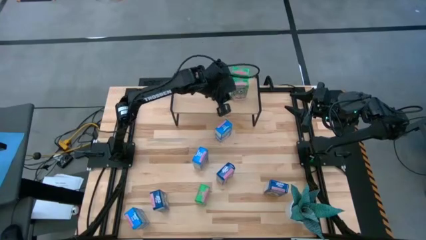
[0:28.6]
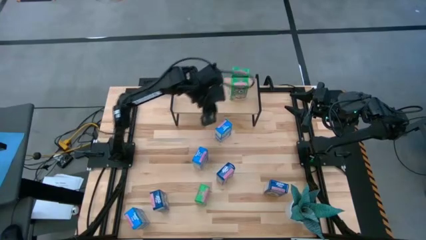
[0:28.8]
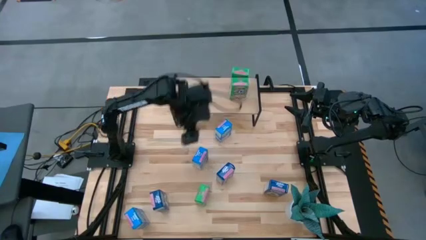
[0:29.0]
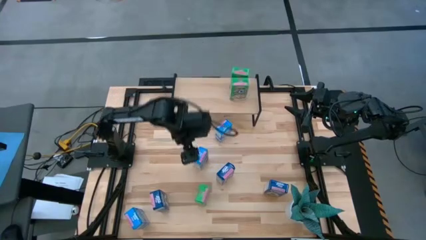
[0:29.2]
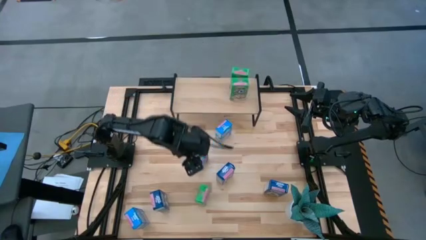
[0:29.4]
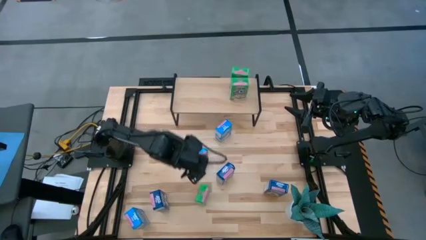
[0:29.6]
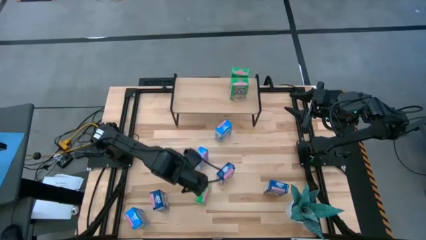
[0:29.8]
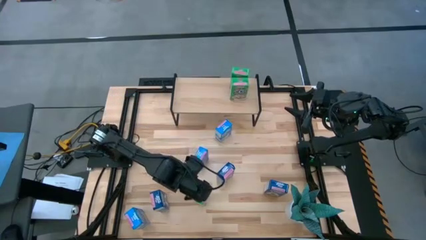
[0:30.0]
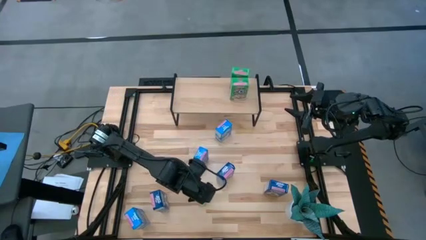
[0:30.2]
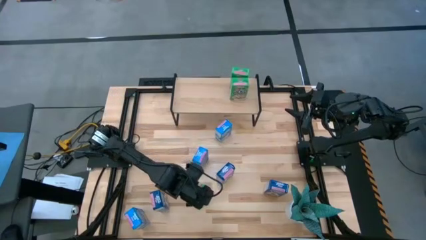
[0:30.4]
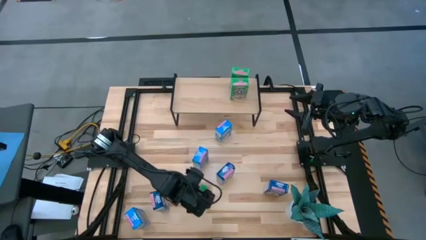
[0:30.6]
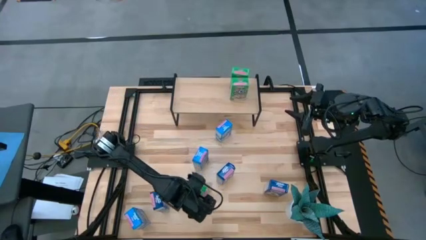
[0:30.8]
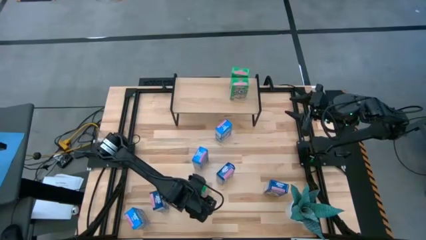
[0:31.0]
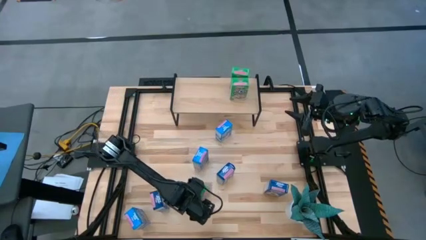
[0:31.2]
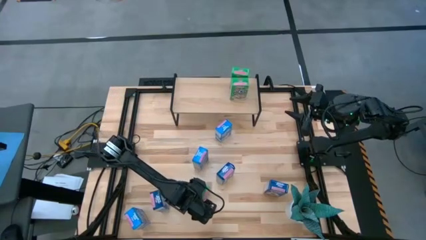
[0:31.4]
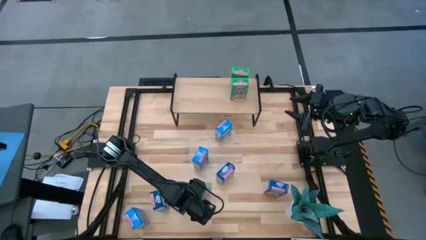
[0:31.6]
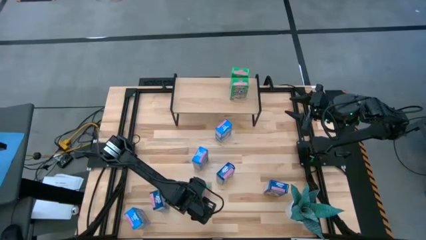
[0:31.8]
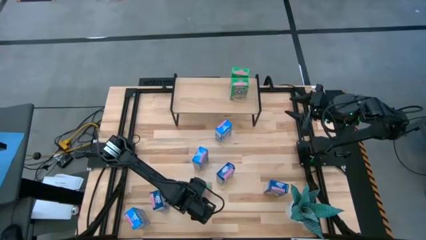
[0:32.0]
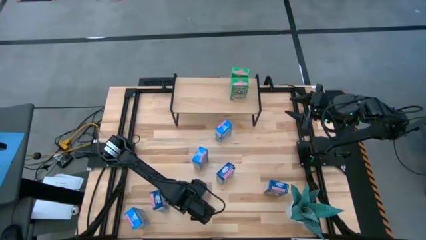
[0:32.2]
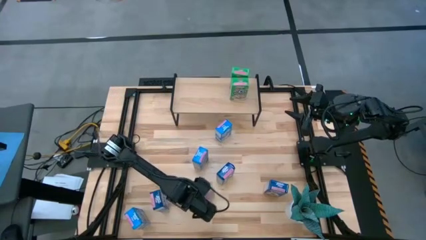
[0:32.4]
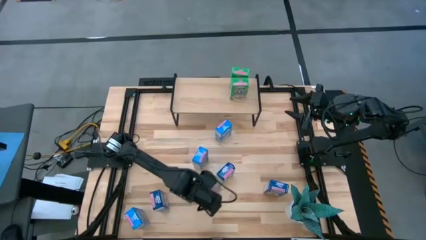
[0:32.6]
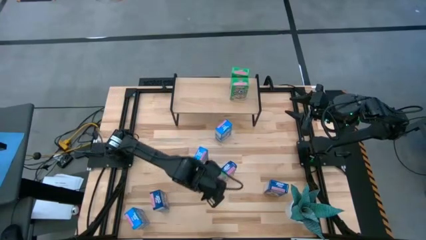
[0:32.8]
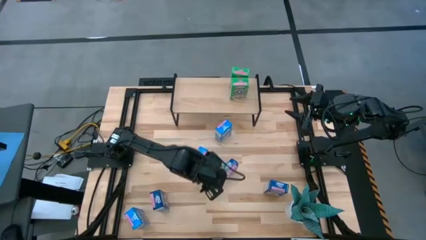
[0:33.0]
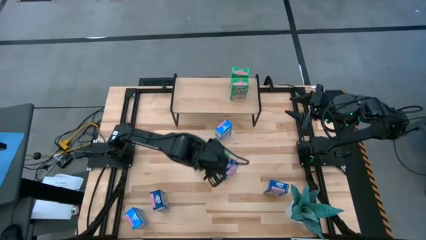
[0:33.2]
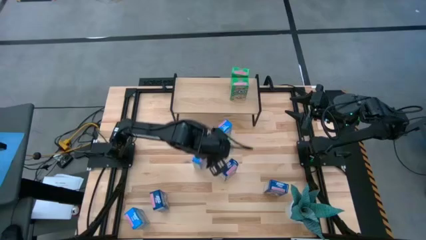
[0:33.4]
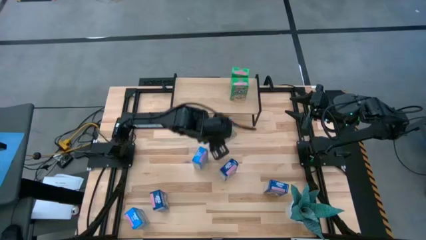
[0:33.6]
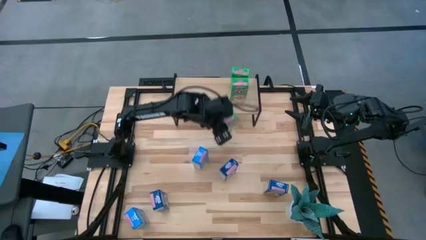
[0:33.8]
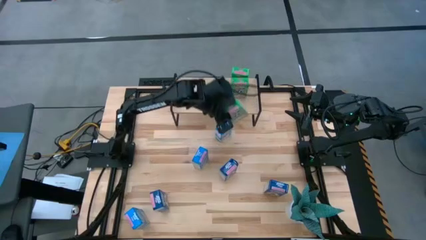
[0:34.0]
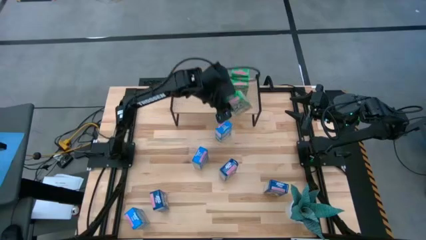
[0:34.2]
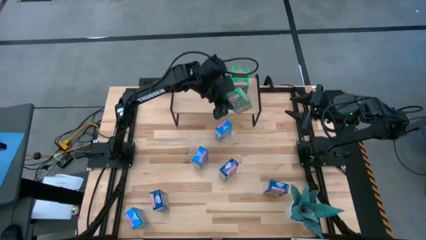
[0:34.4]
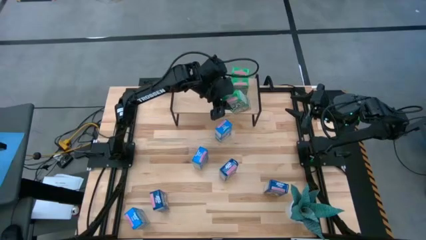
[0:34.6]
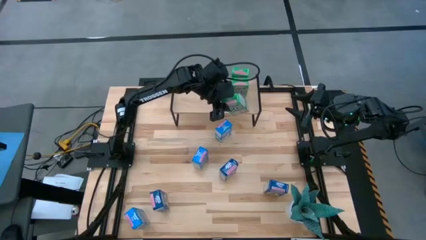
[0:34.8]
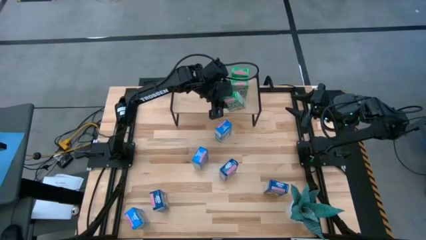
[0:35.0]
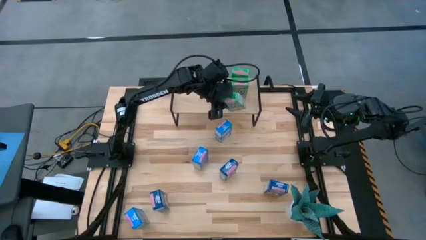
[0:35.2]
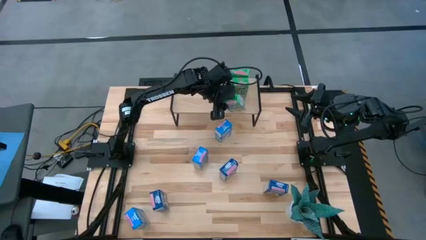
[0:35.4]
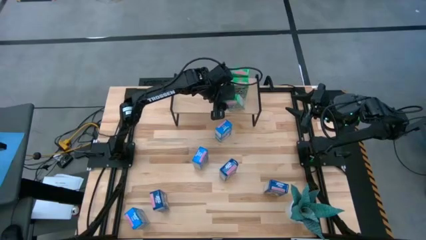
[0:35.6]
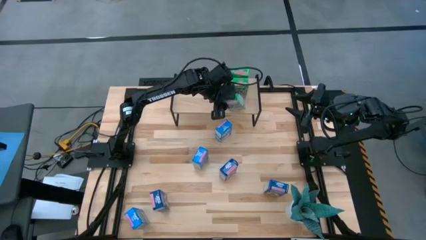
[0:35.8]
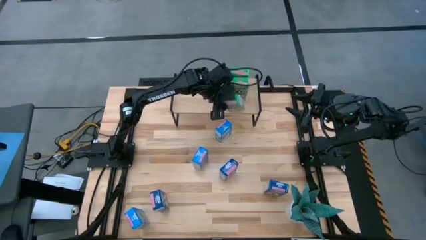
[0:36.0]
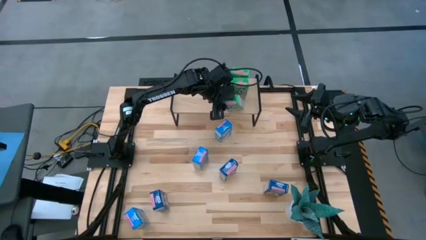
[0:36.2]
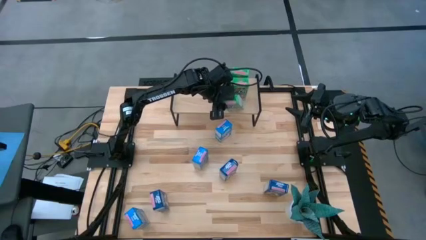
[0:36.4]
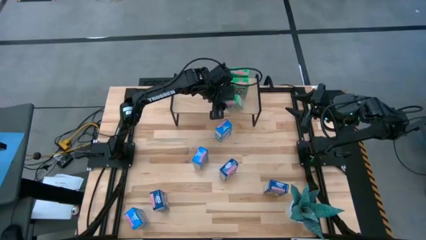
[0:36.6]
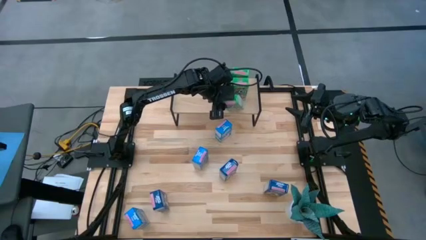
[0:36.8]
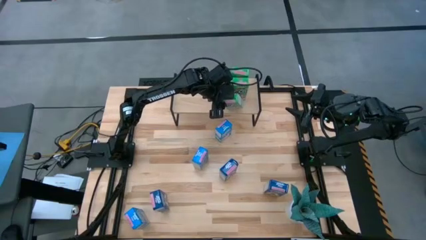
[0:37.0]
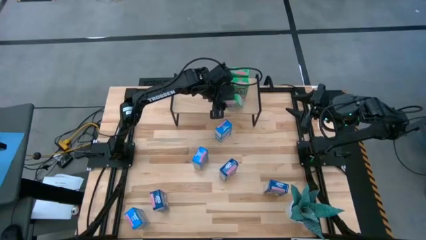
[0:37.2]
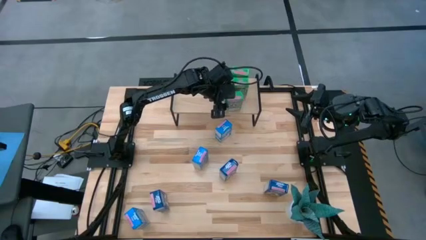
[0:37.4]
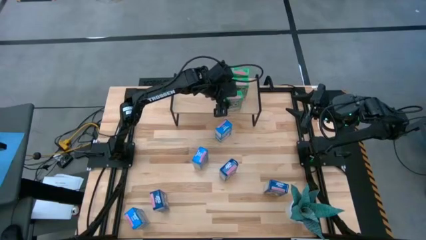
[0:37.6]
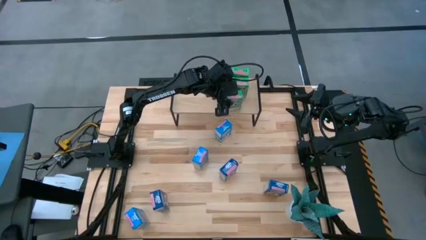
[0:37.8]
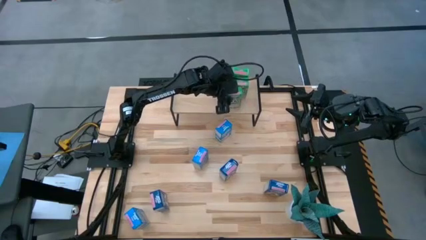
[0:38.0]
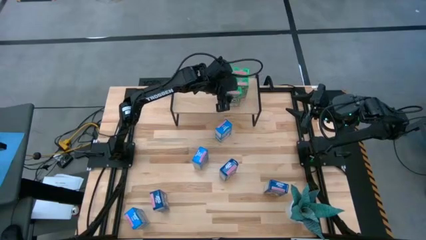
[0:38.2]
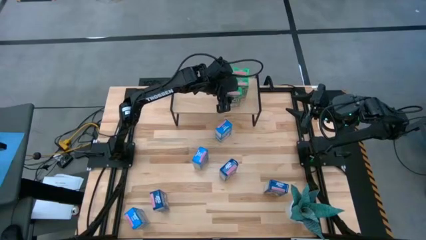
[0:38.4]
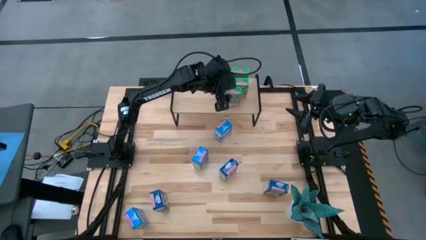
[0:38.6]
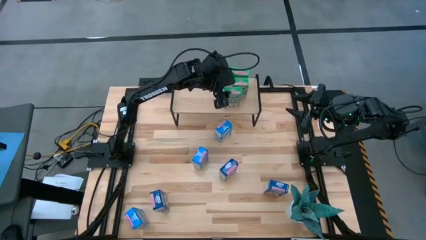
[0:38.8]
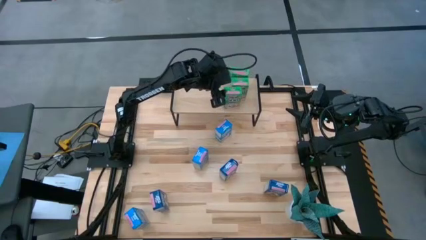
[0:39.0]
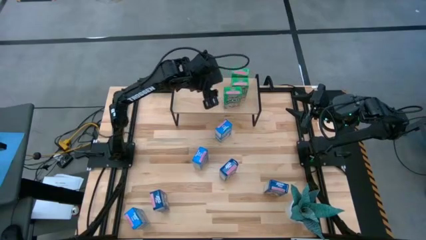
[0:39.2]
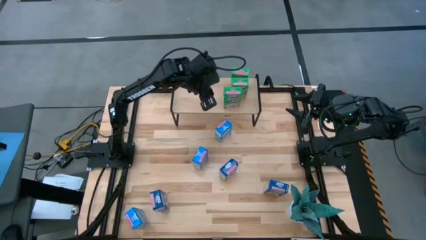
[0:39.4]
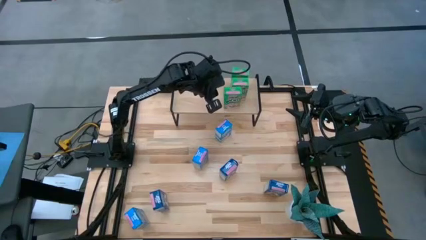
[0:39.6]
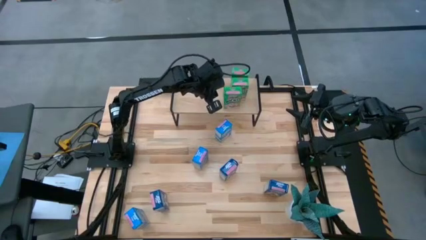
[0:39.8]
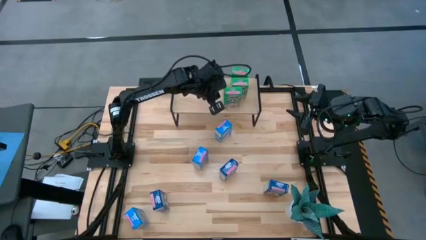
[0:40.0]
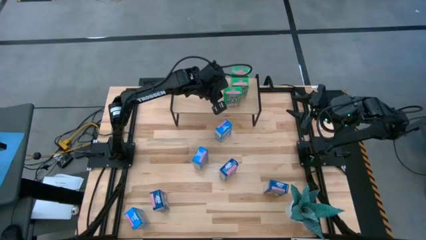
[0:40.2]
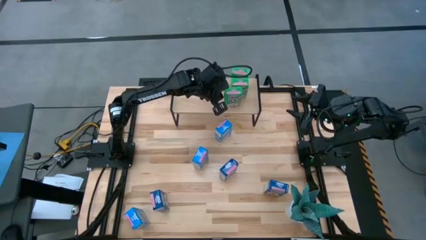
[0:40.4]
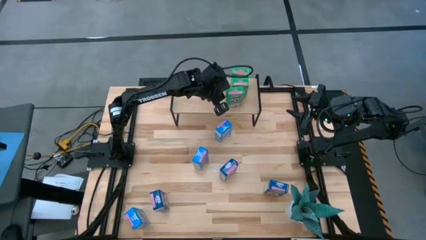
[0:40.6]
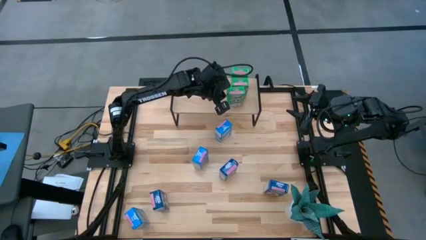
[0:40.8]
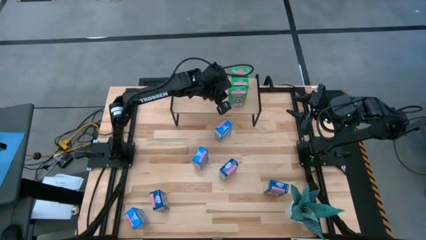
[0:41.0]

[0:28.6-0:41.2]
Task: Stack cereal on shelf
Put the green cereal box aligned with the other green cereal boxes on the shelf
